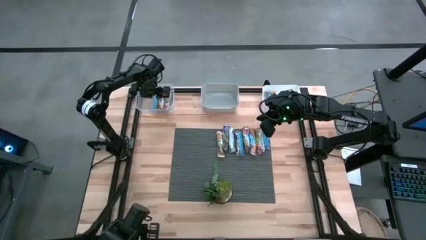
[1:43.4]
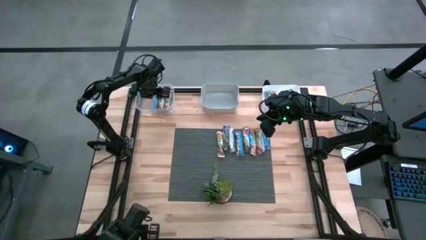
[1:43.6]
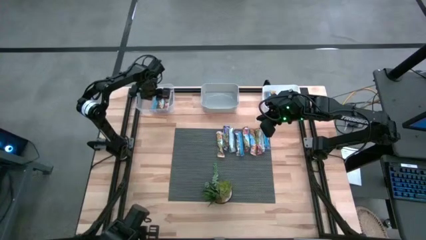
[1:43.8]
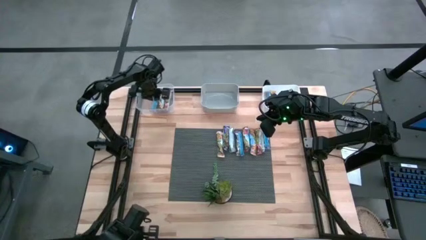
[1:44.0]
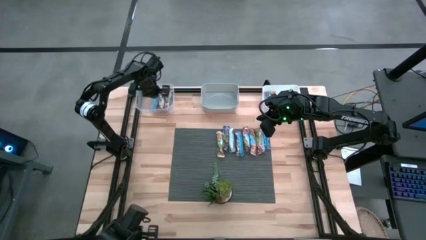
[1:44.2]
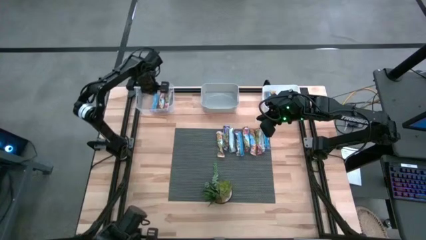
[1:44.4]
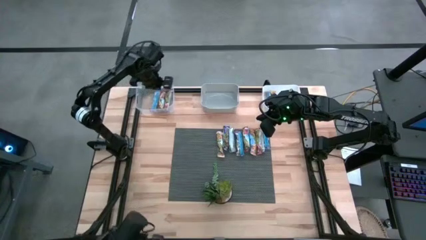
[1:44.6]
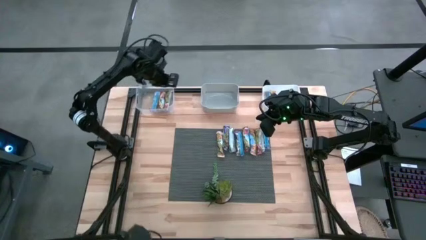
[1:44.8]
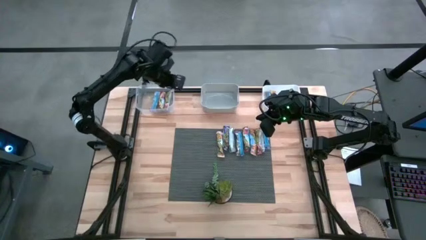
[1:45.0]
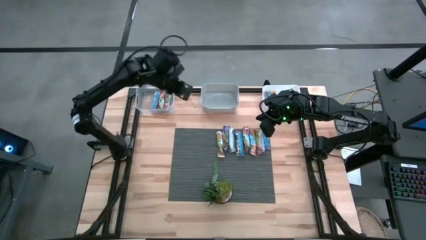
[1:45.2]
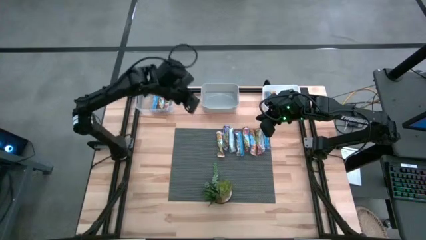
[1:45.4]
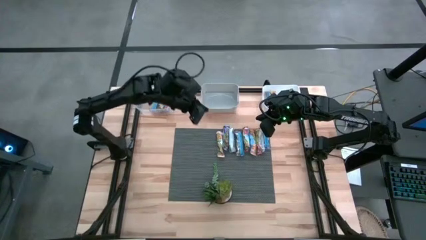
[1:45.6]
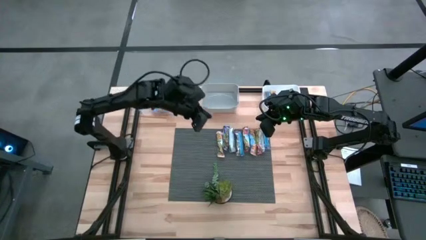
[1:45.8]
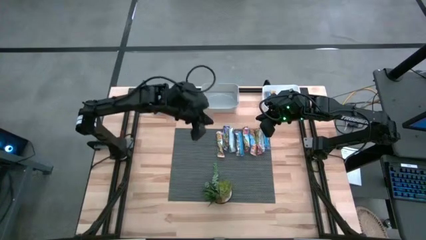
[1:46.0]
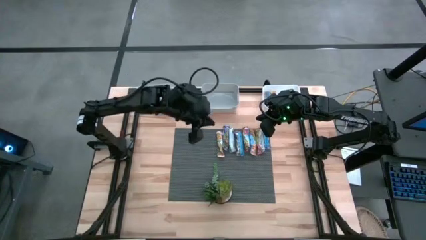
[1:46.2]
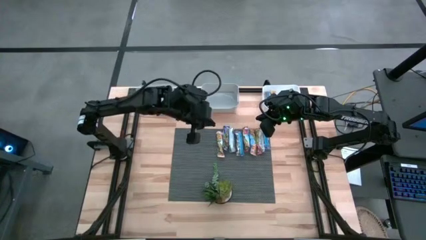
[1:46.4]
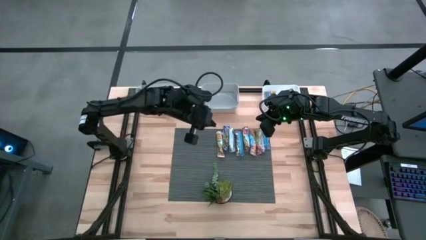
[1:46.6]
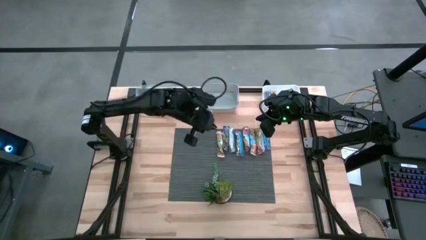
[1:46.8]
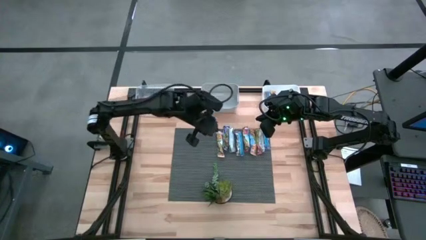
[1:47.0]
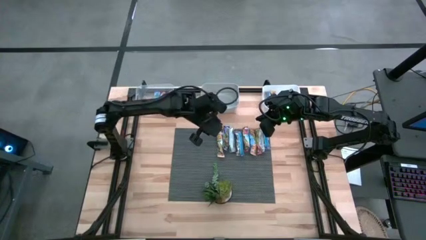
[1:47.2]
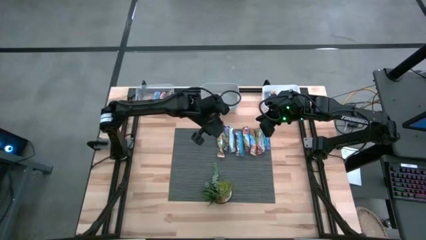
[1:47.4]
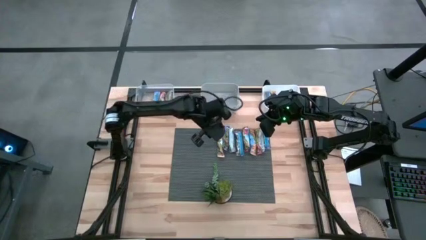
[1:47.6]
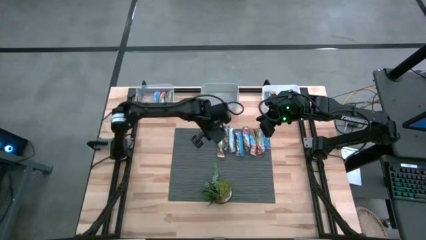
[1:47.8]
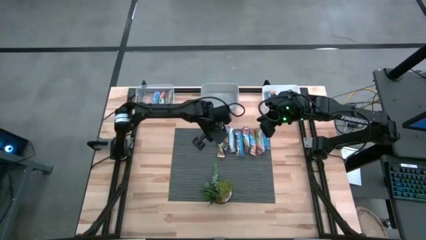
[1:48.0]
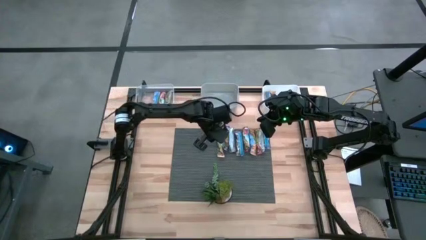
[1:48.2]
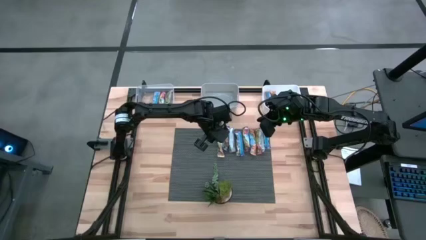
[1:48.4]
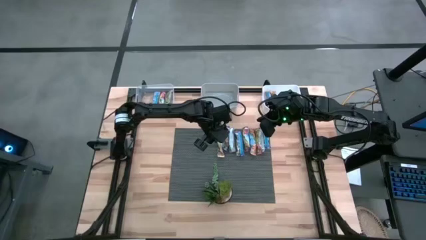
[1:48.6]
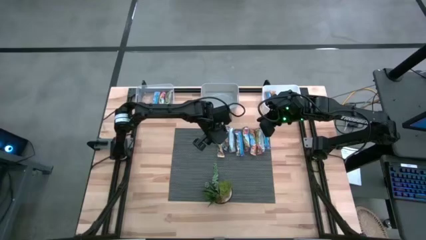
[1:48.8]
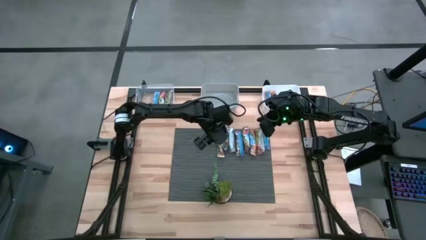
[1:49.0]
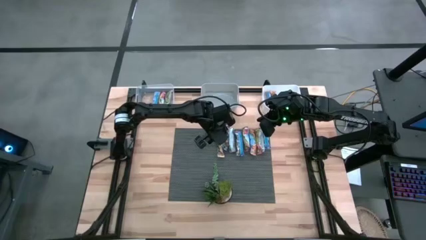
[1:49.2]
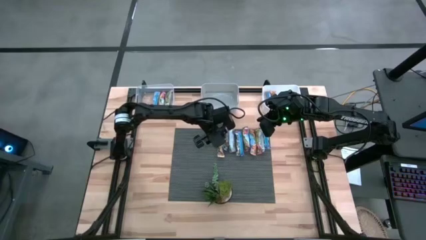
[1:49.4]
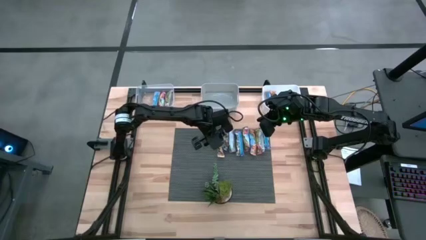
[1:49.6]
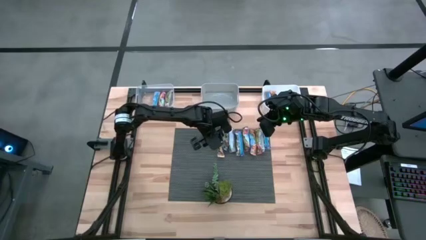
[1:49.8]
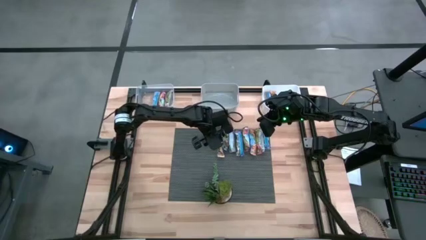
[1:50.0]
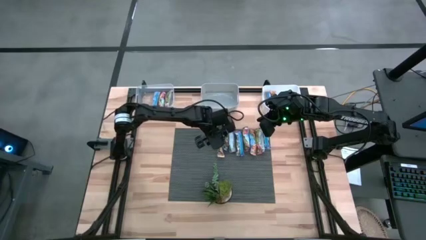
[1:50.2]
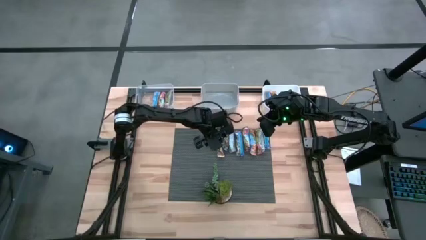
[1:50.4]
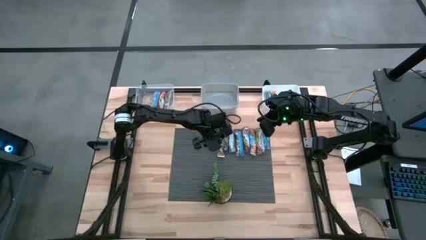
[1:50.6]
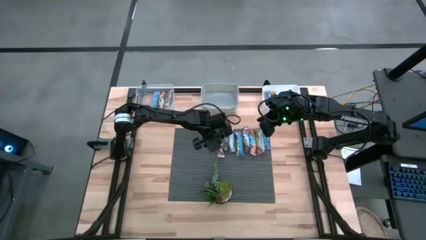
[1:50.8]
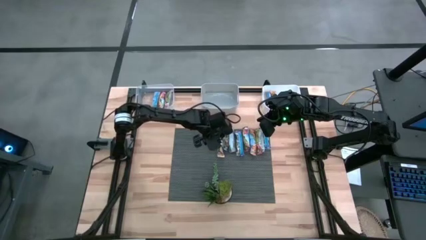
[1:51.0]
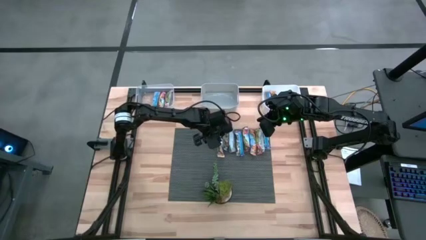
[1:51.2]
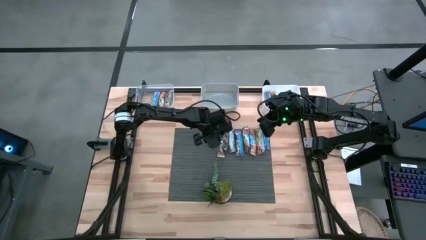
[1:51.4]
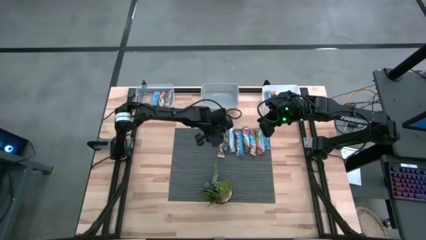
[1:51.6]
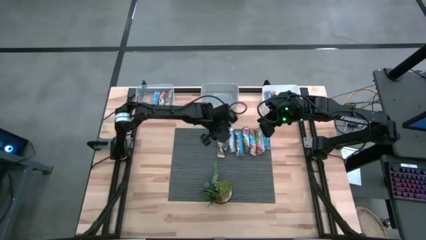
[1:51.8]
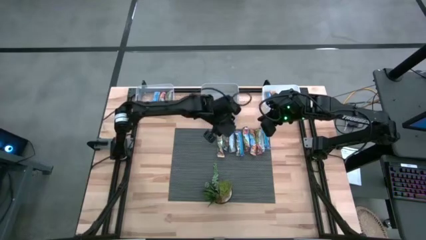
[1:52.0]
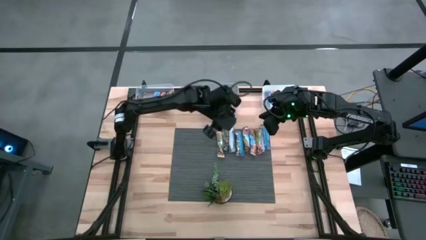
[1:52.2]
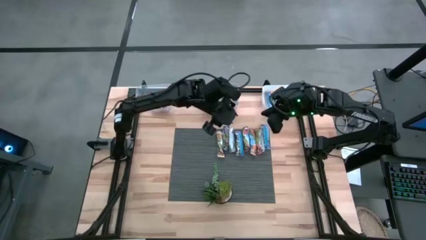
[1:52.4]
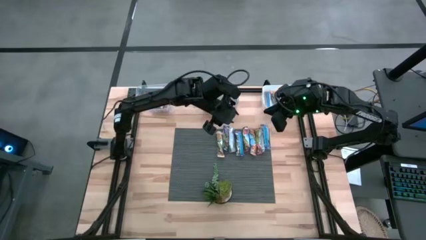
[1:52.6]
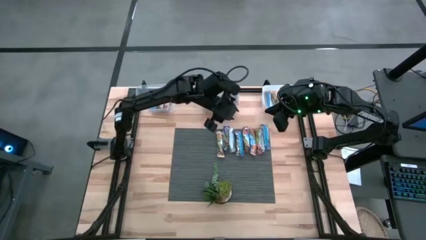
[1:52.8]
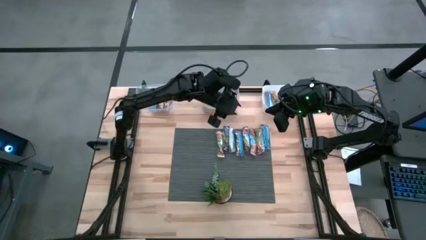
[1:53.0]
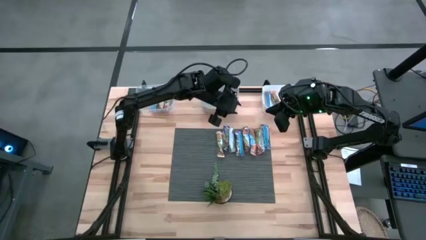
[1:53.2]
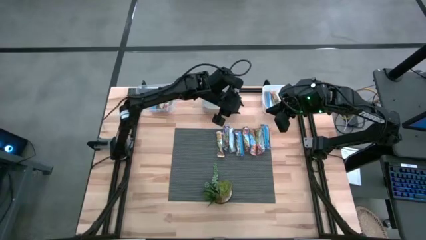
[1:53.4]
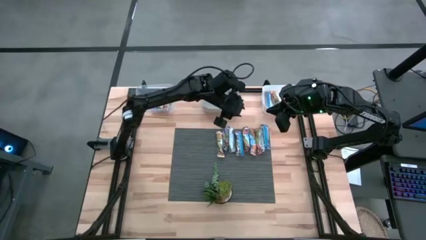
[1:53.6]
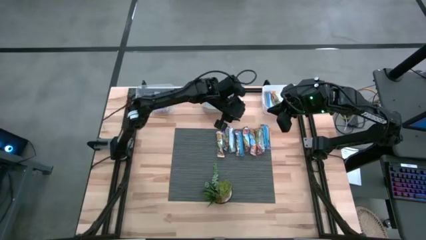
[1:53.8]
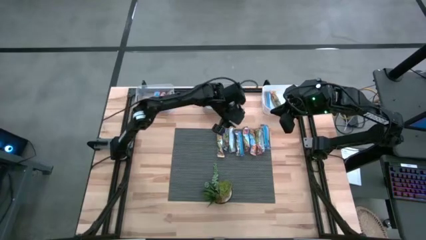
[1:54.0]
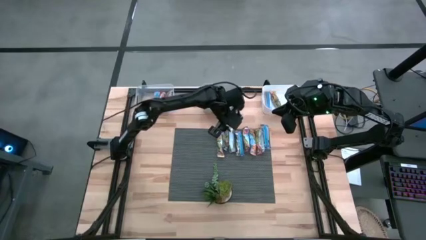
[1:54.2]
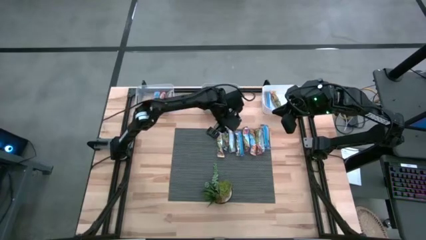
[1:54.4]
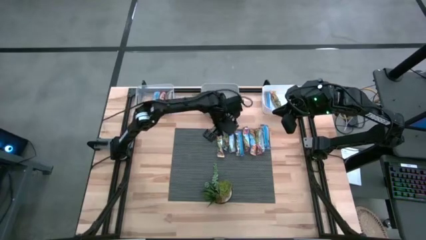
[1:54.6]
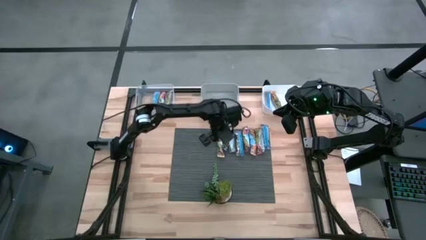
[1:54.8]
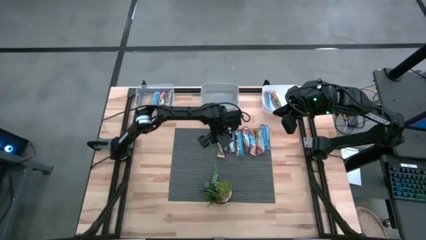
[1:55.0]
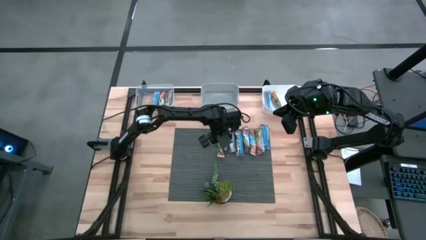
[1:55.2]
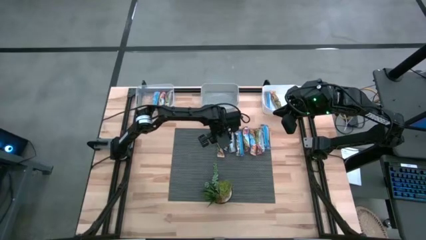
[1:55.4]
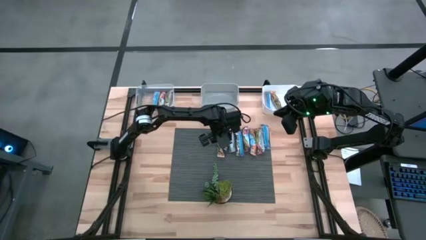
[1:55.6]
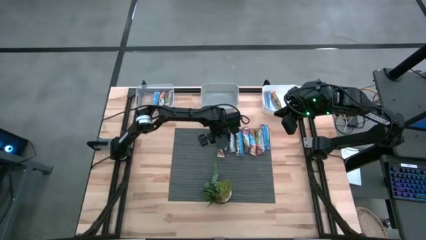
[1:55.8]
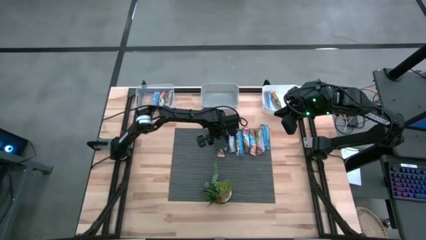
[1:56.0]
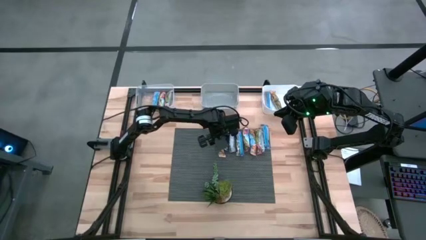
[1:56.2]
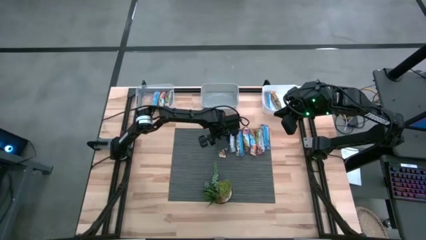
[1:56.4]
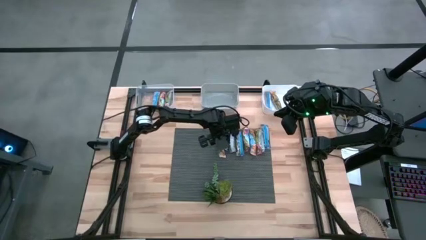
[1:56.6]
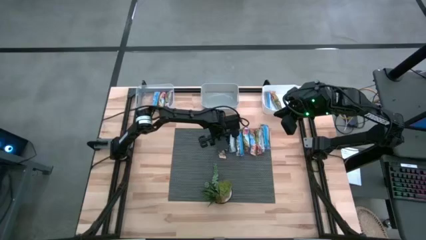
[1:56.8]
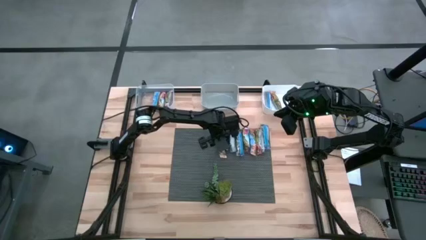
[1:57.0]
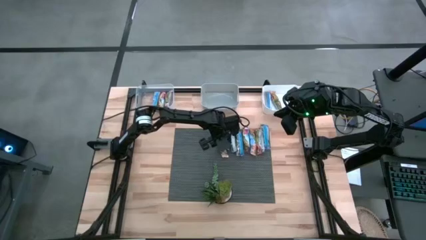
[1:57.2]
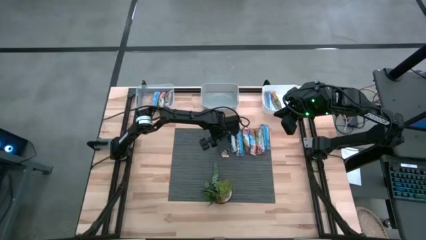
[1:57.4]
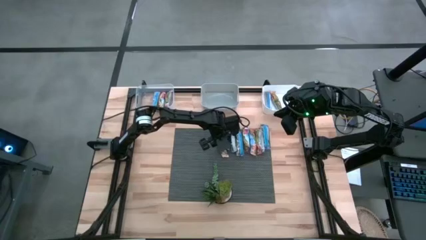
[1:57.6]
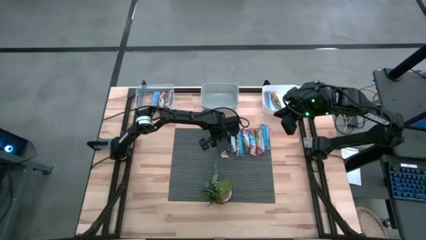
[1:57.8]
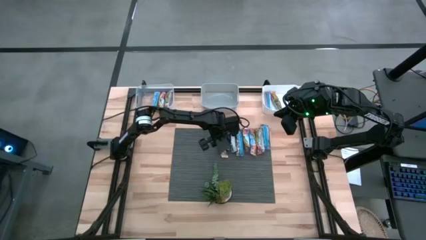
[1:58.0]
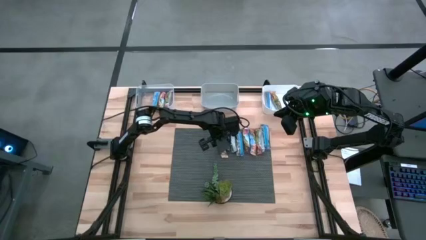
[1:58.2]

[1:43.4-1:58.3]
Task: Pick and place Granola Bars by type
Put the yellow granola bar into the white bin

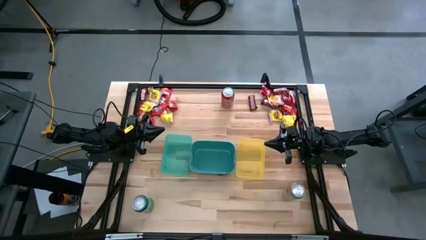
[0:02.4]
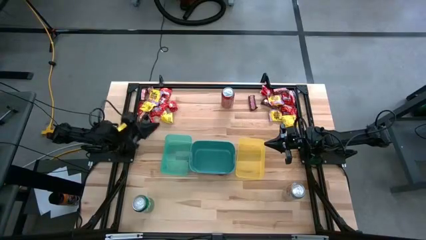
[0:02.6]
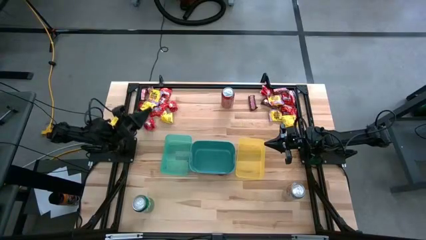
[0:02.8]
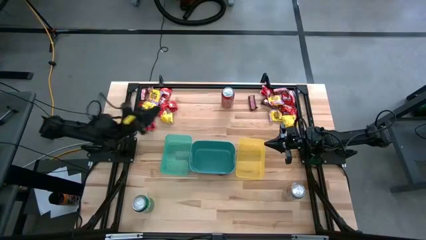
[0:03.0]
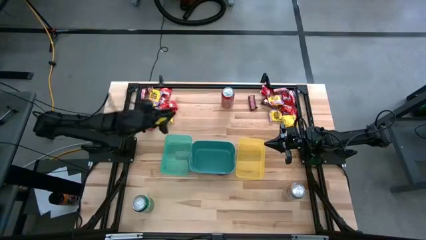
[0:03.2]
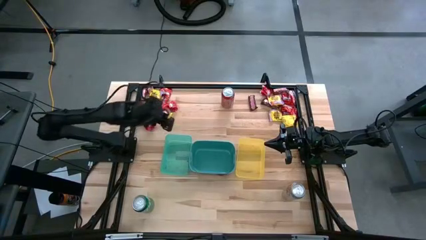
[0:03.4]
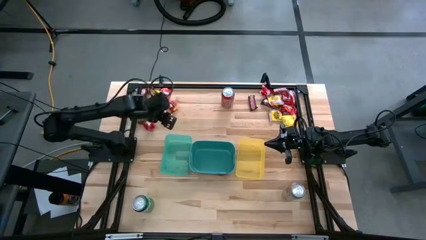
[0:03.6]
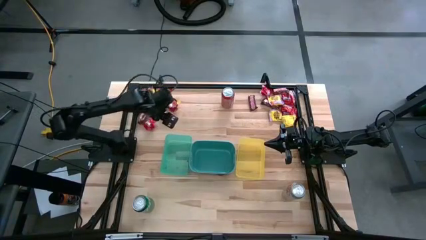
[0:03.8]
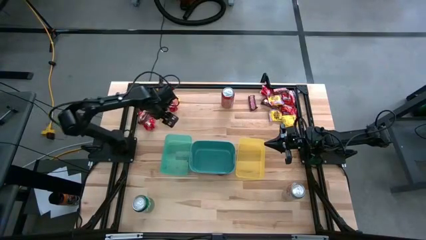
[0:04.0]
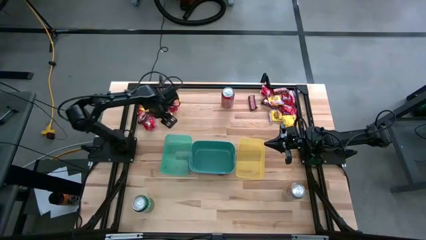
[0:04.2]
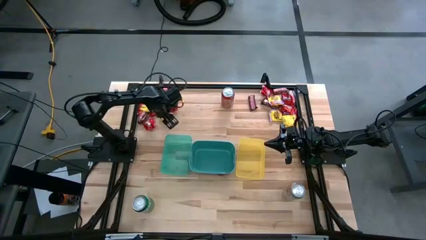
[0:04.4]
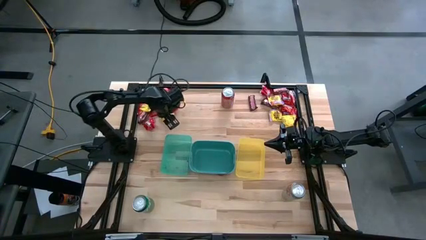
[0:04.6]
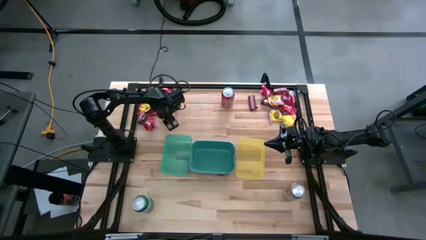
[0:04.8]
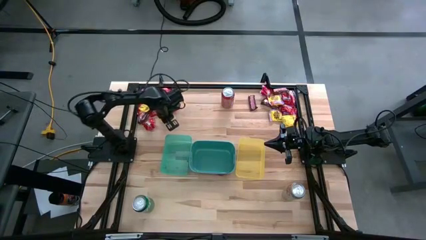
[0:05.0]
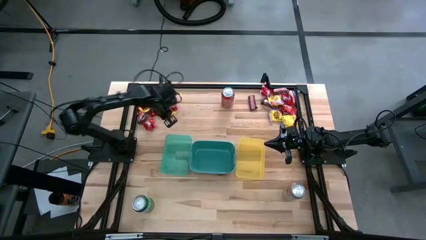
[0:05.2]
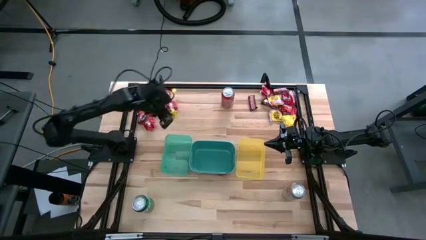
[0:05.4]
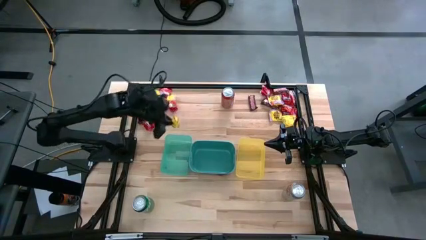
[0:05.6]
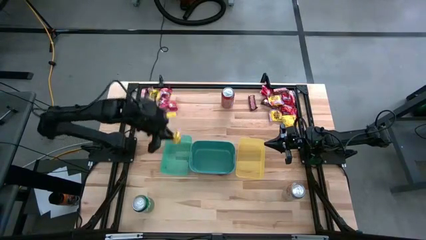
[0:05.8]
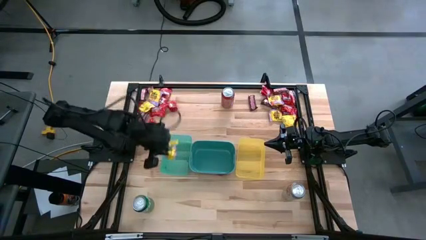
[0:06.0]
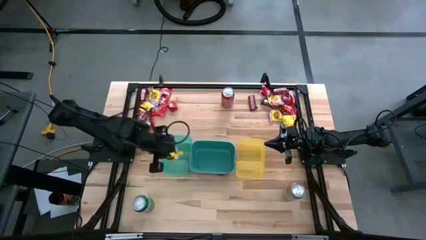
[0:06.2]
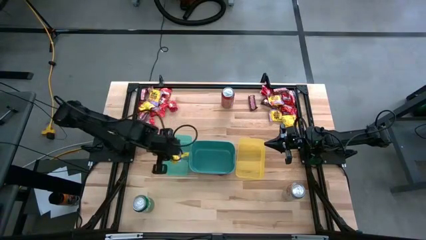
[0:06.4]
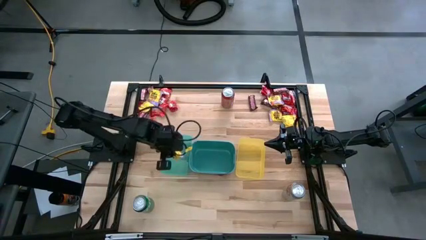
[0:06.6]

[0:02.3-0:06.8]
Task: Sort candy
Put the yellow candy into the light green bin
